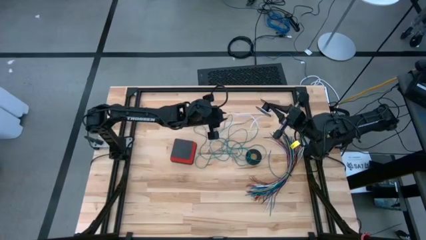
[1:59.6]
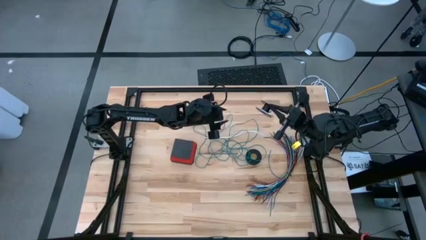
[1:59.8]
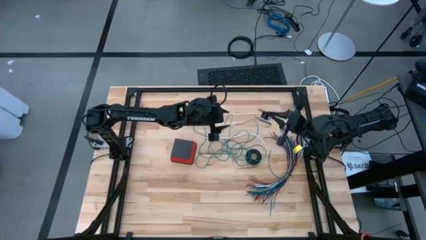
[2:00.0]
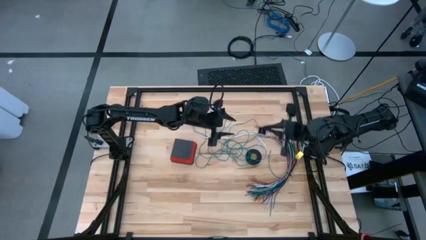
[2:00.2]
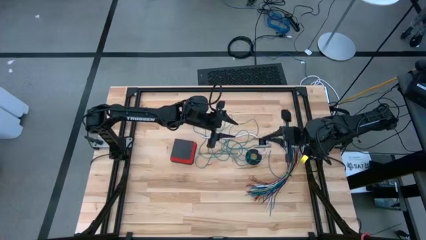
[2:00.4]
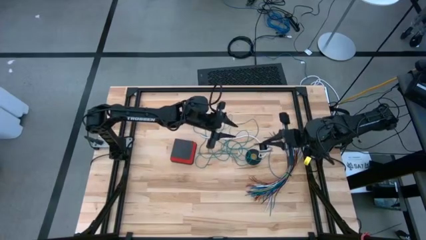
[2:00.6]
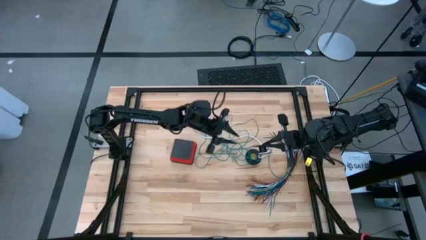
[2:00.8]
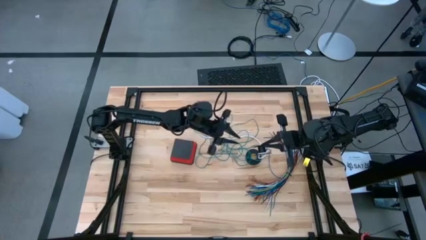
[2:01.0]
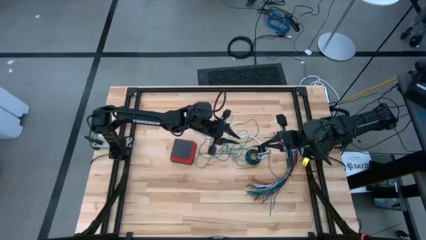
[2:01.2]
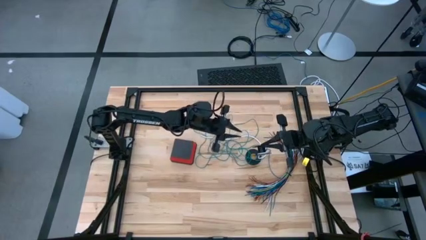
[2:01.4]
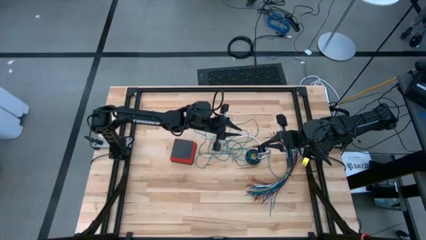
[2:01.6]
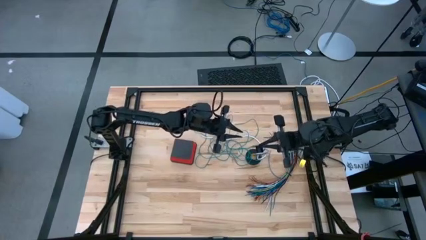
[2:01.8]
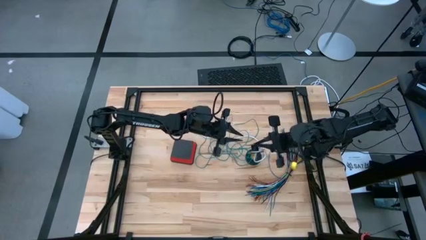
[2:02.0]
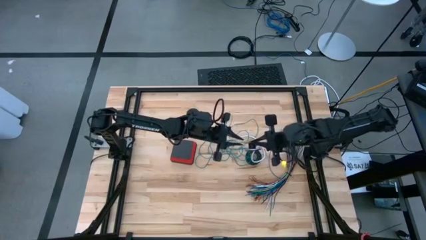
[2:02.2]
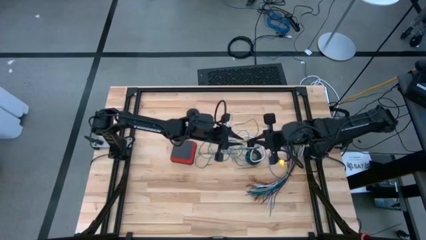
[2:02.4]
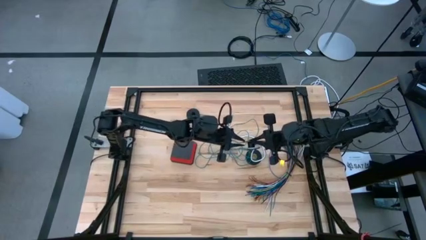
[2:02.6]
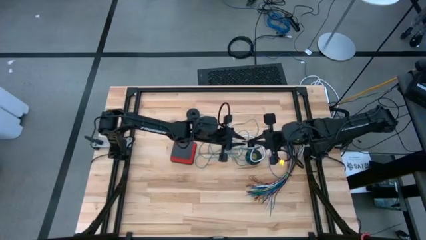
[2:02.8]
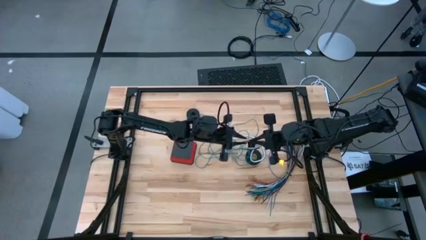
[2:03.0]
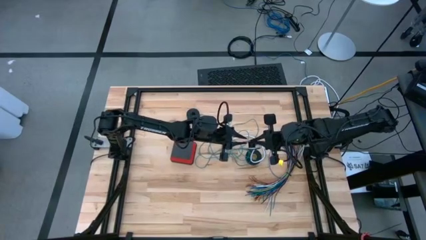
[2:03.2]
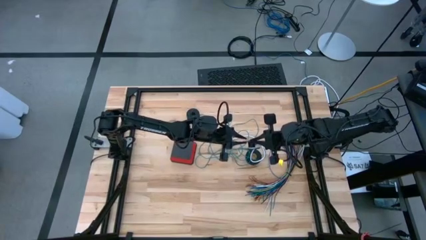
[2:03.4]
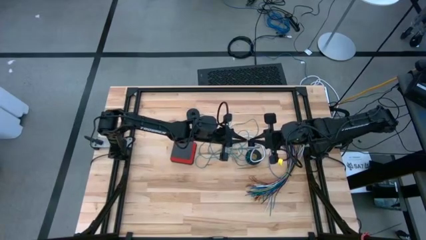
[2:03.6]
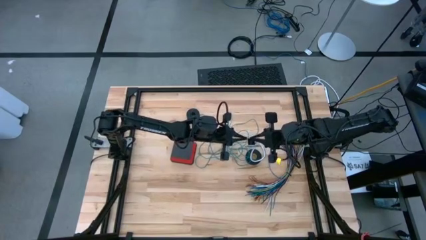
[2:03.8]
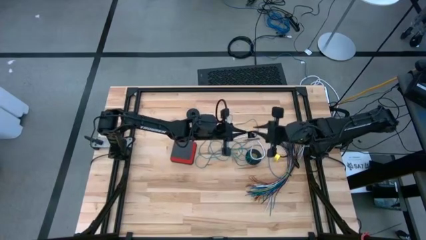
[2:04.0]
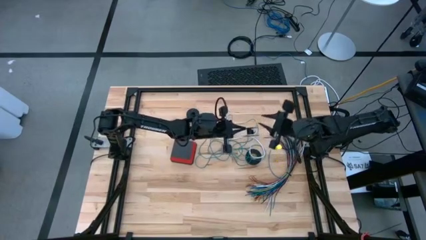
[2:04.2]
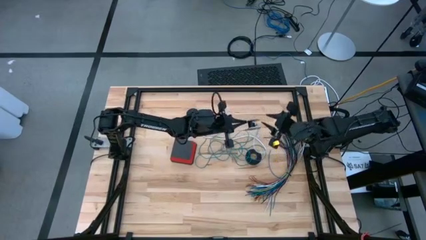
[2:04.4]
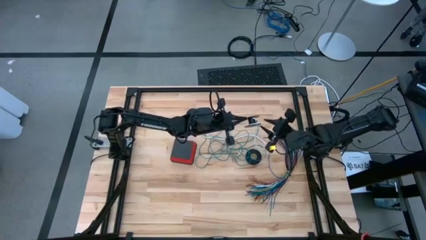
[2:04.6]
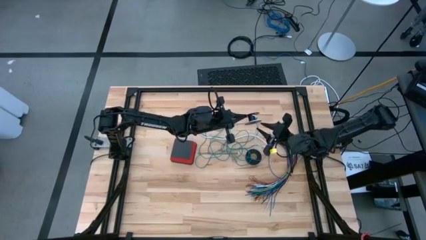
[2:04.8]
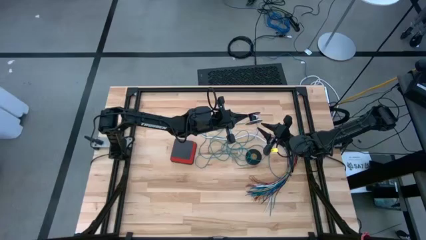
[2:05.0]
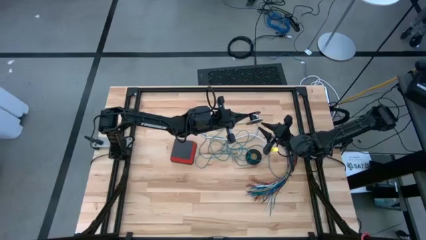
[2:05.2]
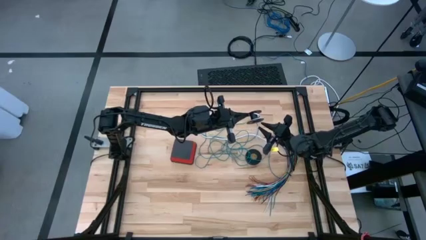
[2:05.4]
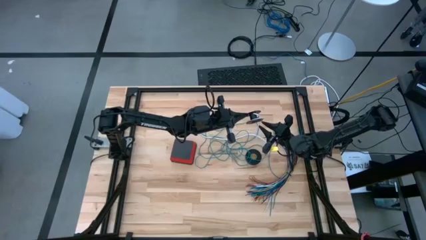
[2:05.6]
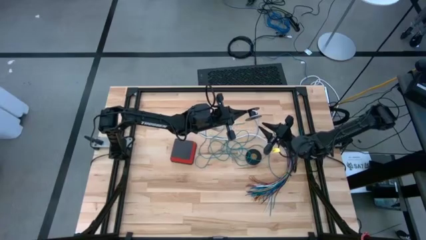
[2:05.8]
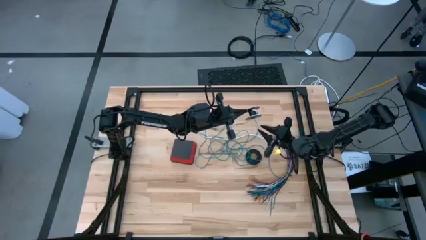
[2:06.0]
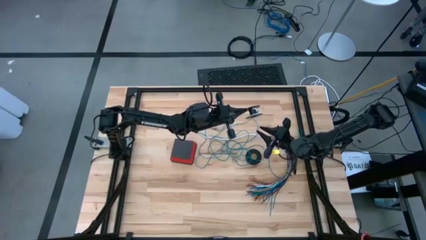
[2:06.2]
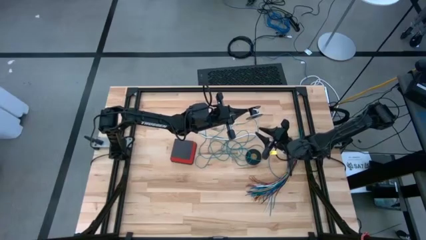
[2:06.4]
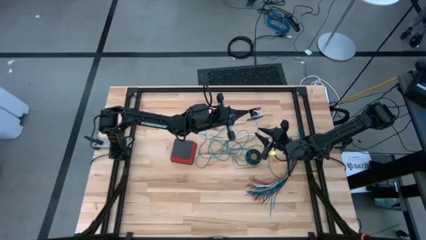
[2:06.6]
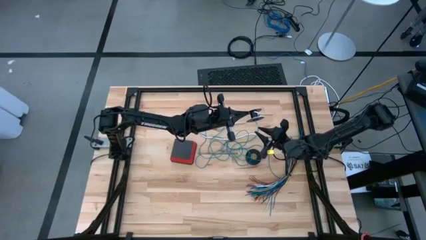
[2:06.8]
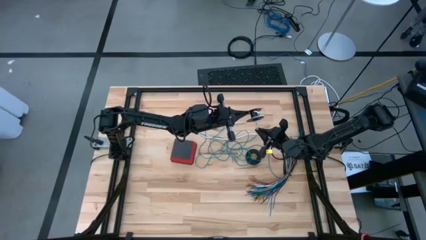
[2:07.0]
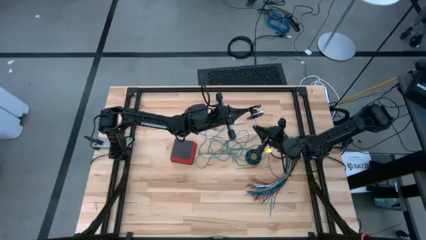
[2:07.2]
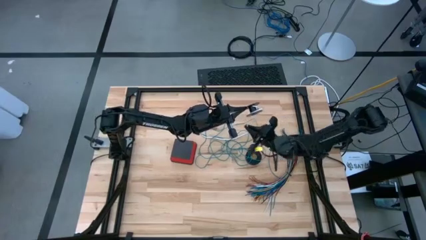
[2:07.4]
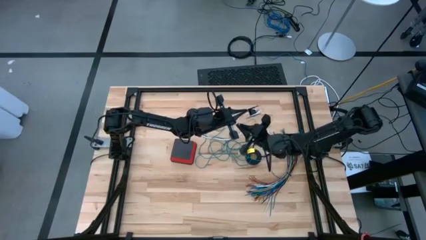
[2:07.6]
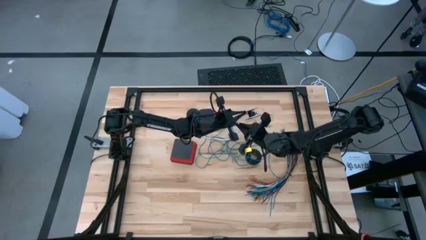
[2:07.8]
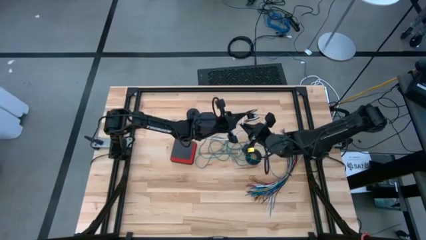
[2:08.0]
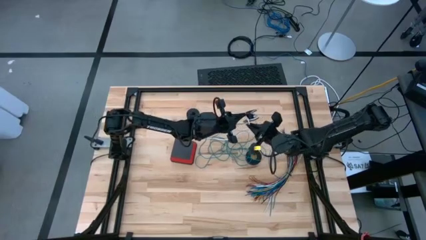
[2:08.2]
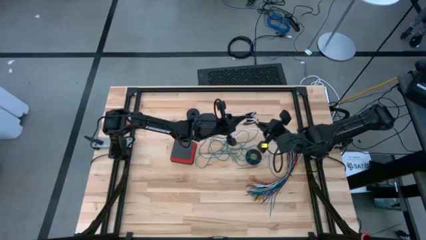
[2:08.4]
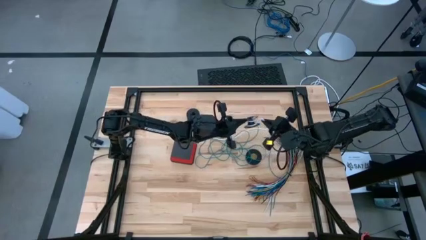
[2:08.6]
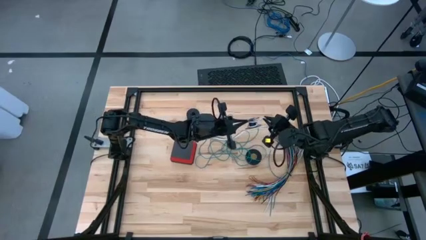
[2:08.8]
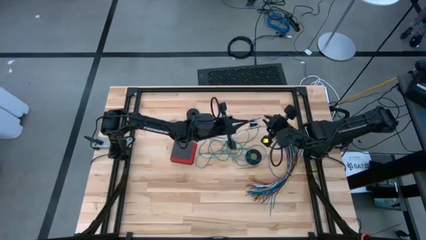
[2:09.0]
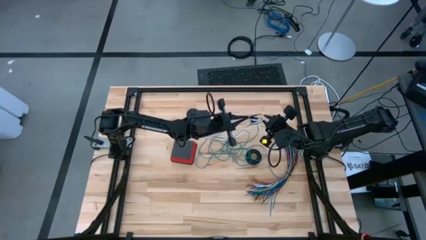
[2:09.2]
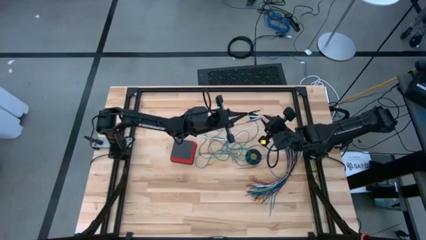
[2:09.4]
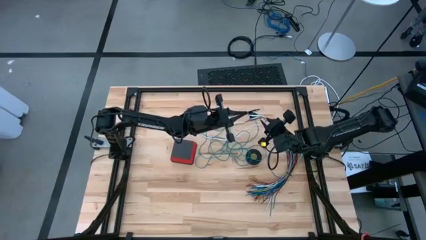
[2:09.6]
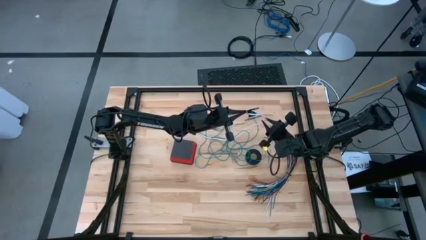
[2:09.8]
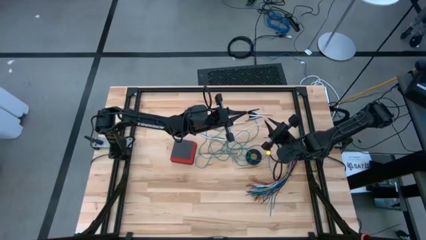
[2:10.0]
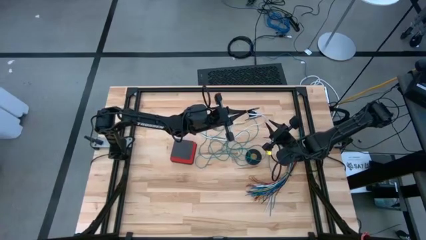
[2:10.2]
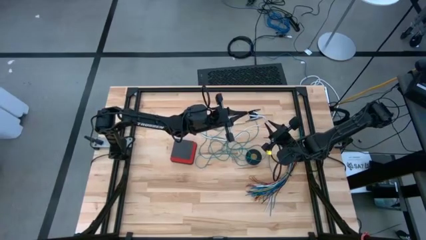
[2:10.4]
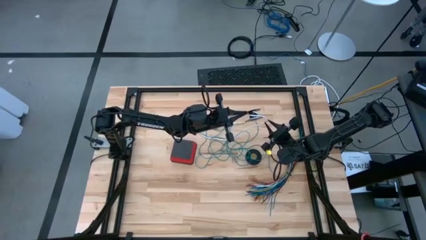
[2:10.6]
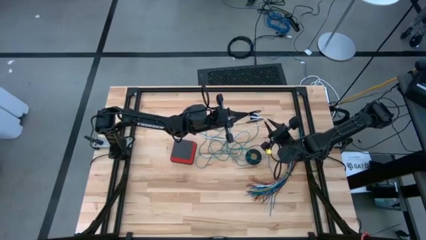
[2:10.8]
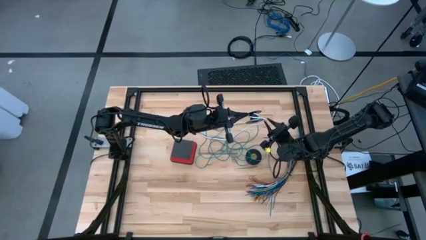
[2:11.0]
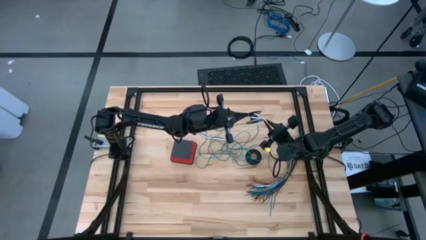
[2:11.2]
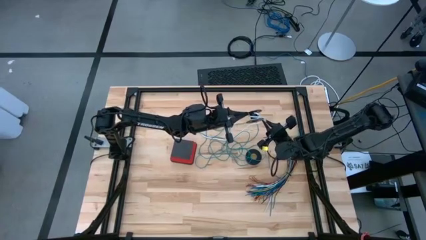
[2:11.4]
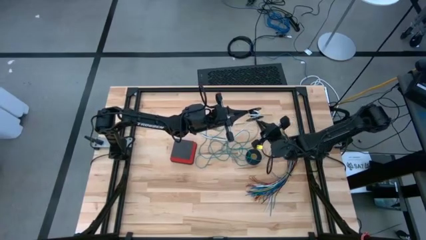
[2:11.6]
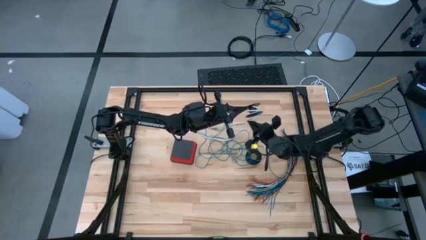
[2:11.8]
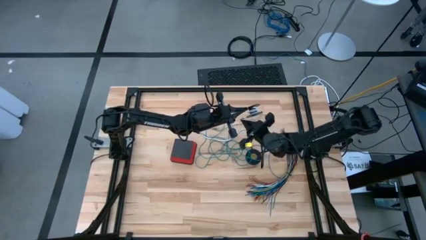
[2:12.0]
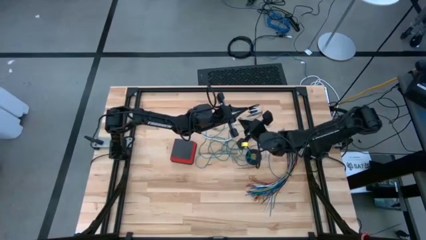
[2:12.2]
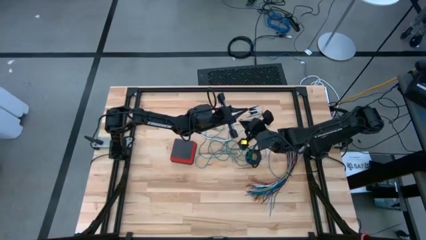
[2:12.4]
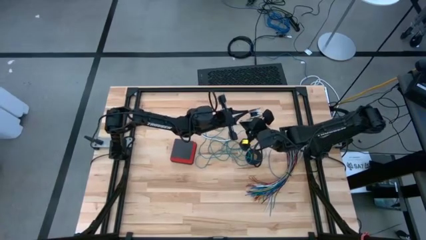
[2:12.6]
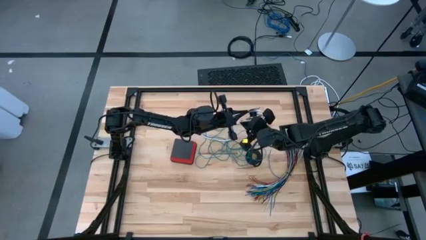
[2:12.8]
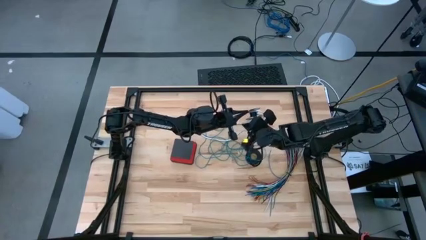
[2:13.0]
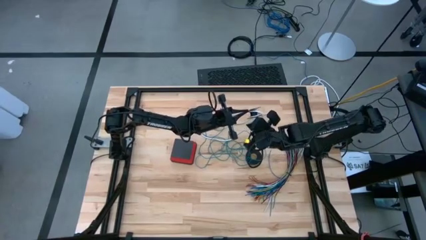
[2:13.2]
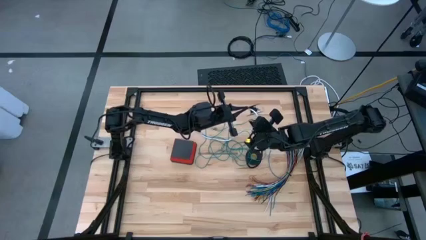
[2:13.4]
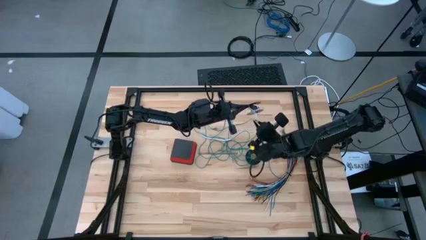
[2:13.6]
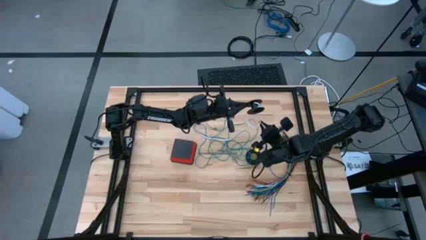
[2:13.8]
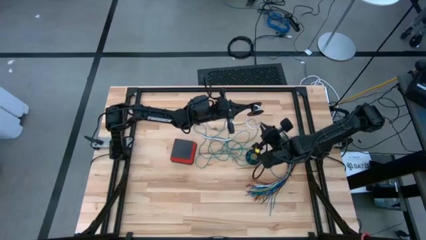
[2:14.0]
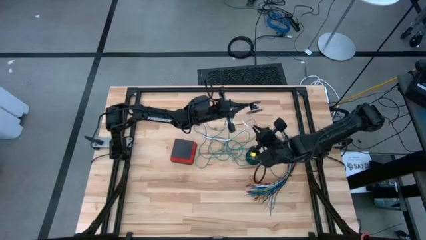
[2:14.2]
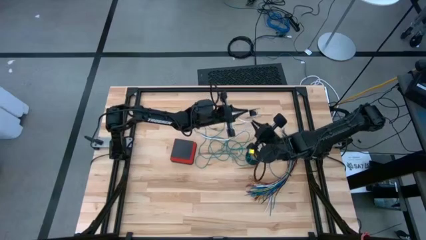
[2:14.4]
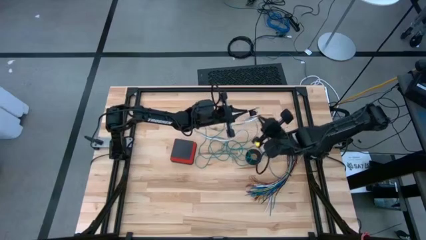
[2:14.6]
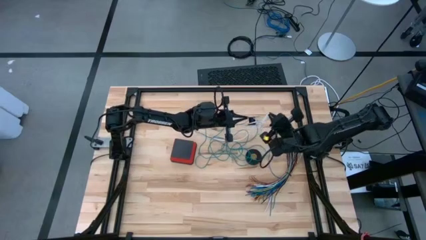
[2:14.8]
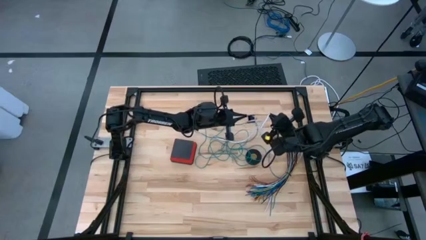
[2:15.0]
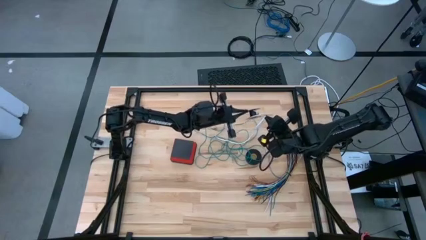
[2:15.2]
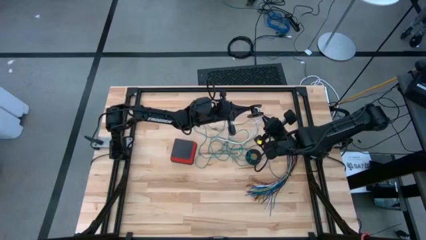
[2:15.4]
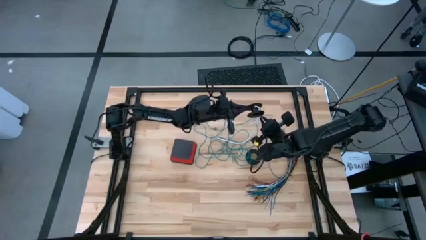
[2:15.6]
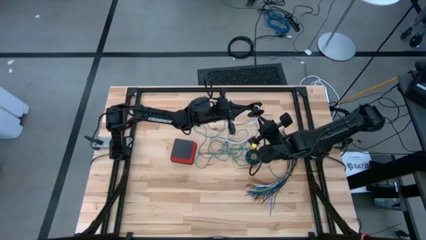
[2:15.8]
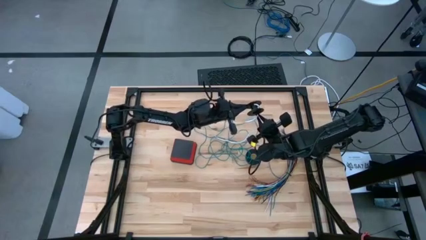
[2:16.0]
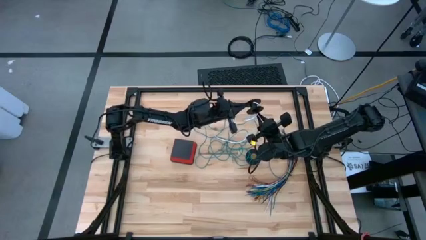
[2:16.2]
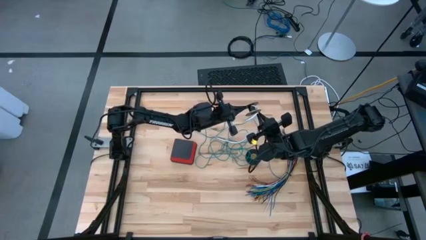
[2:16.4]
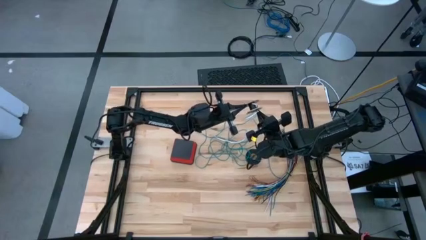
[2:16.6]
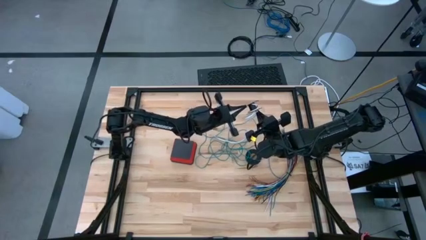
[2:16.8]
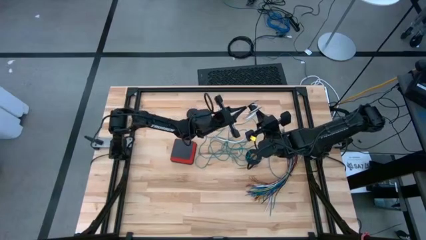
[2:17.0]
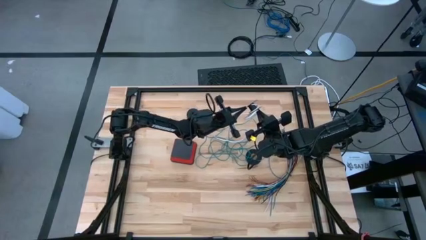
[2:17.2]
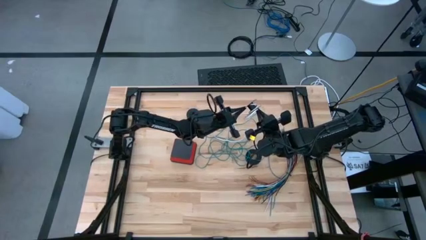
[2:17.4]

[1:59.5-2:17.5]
Task: Coiling cords
Coil the white wire cable on the spool
